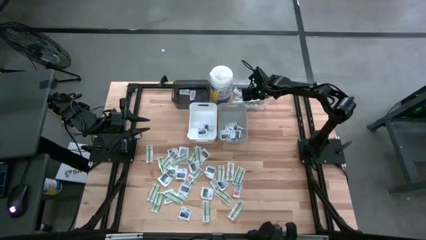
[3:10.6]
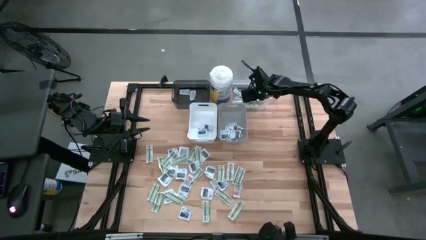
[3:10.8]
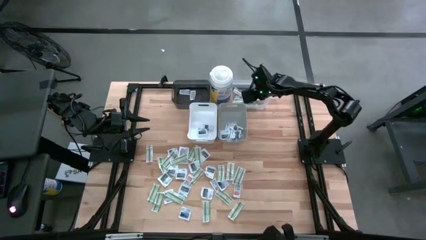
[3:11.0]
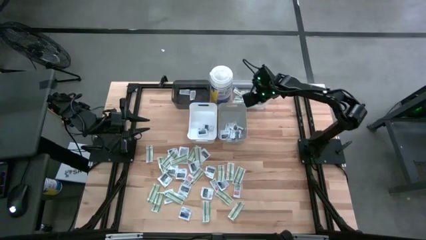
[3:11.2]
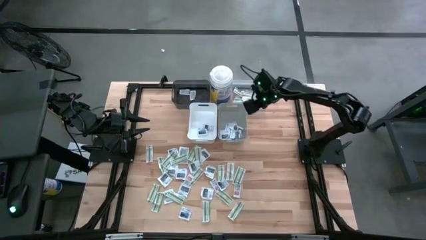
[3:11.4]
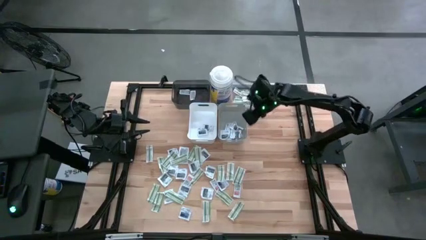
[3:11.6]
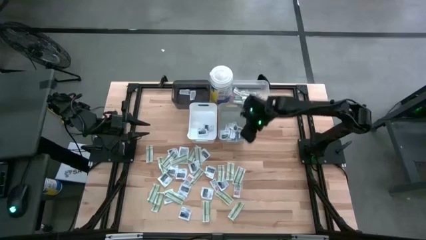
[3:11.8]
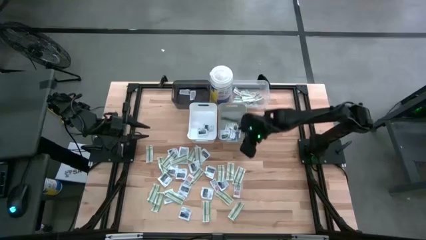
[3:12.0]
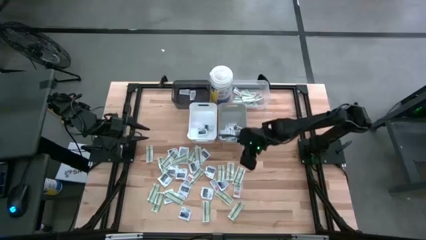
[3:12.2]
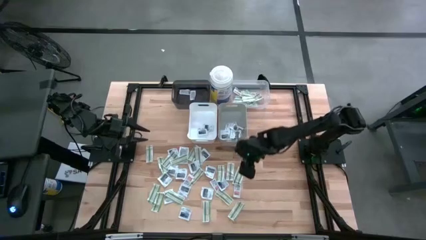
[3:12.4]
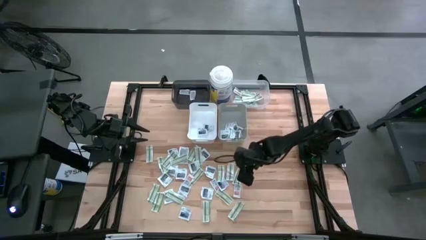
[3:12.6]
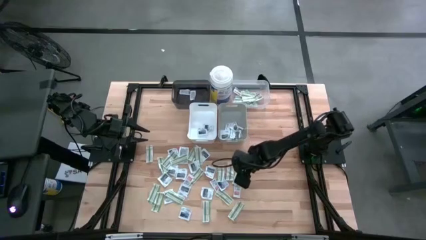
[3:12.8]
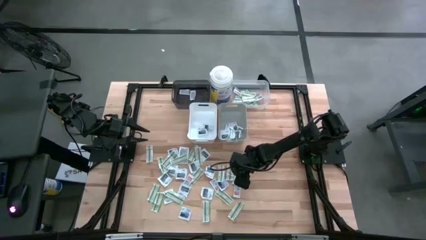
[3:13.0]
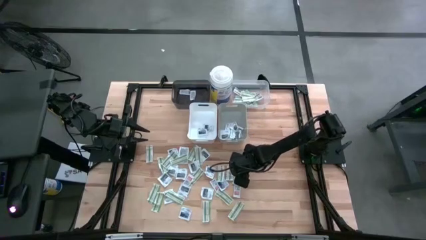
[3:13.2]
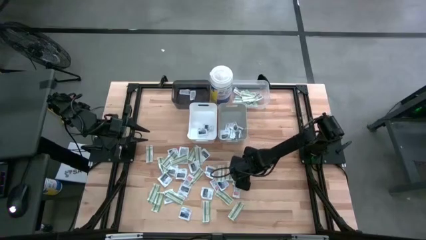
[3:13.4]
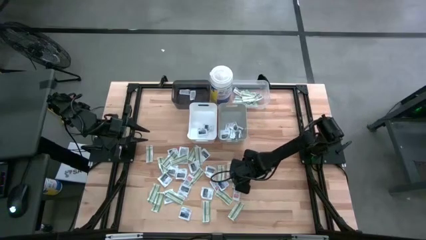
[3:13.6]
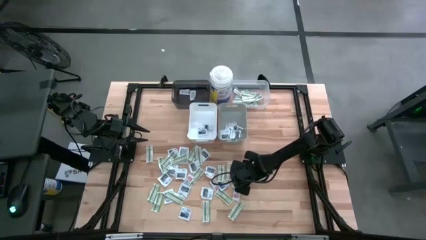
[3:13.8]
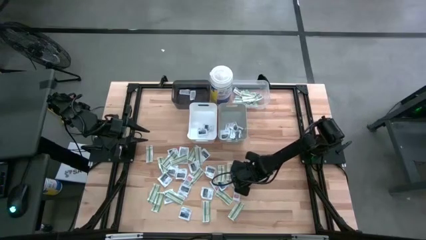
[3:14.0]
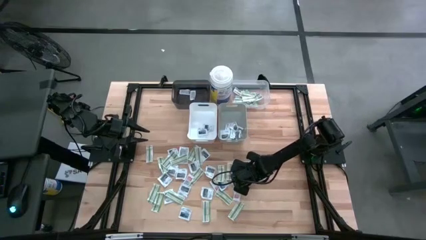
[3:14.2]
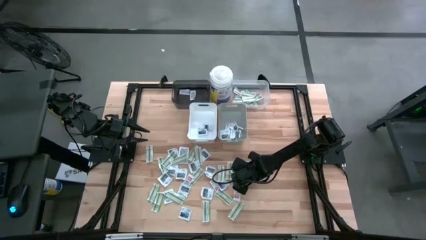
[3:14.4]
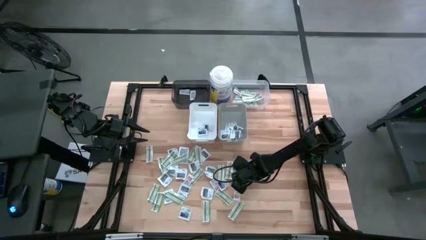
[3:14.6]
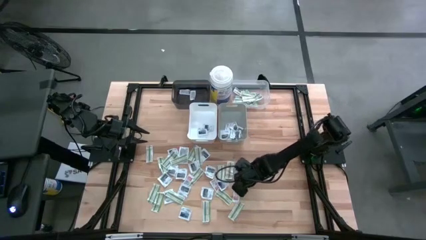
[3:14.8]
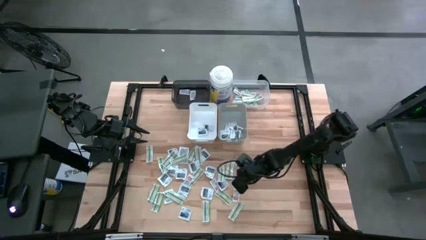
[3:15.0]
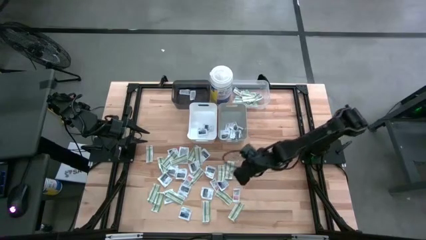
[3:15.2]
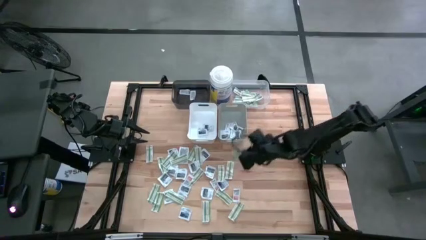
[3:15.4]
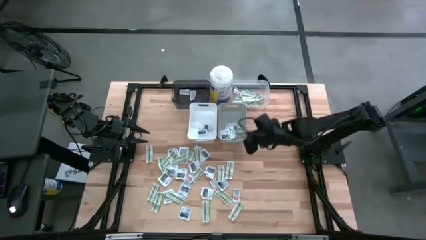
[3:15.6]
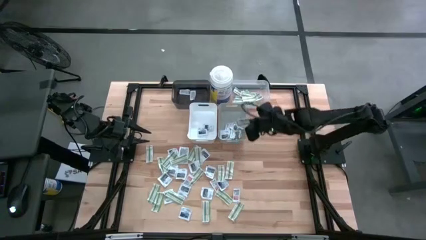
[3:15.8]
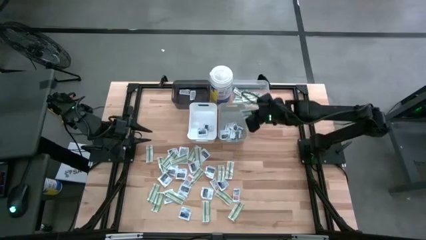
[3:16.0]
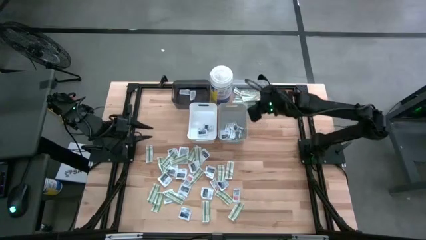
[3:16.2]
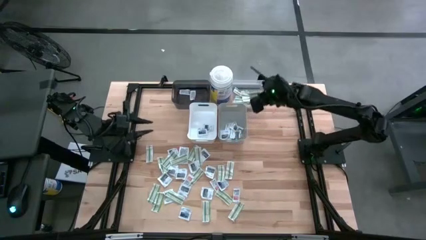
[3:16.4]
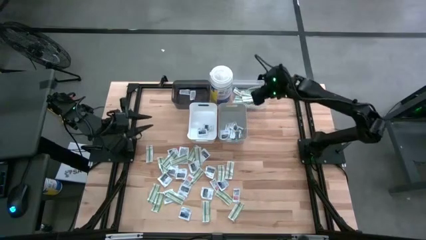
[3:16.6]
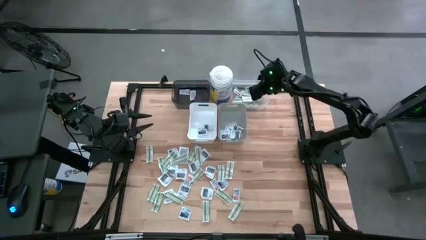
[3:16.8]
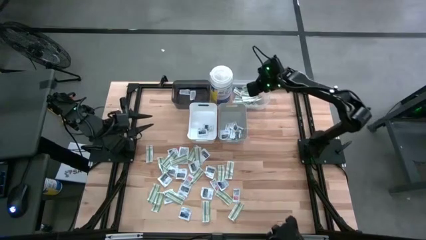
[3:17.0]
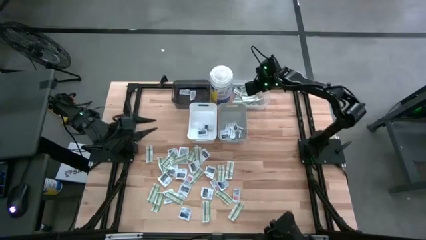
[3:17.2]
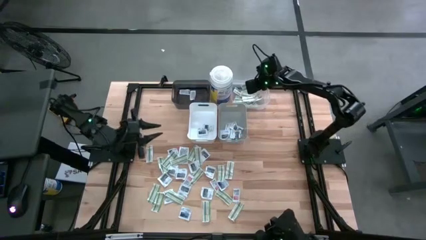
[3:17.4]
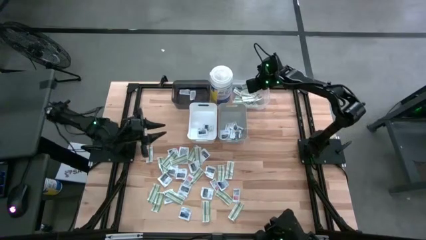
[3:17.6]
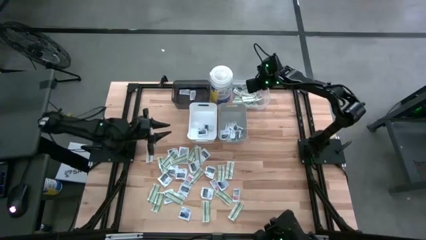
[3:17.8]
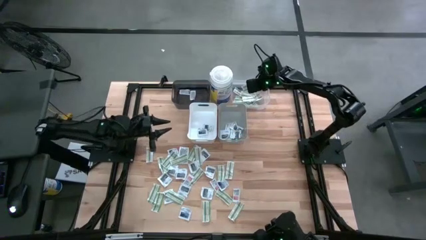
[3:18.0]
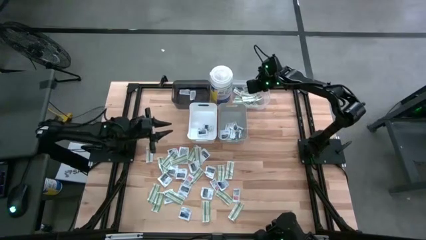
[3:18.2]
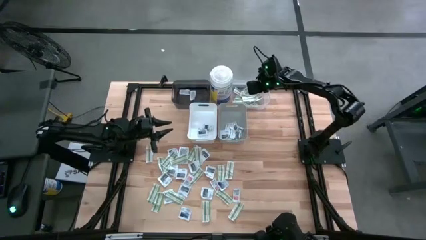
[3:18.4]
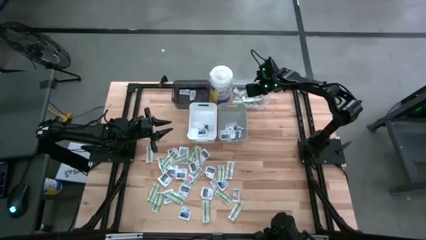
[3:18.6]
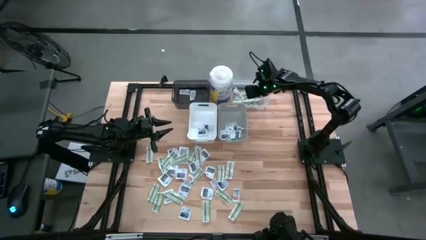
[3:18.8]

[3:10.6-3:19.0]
Task: Pick & Place First Aid Supplies
Put the band aid into the transparent bin

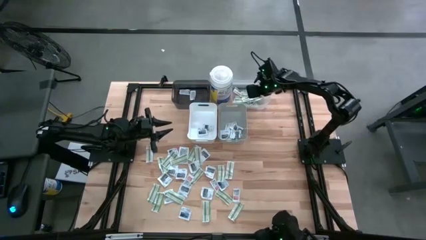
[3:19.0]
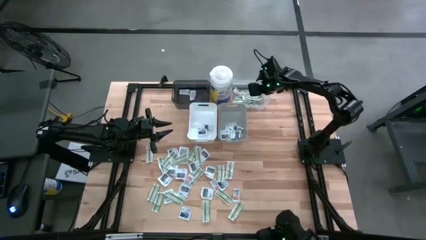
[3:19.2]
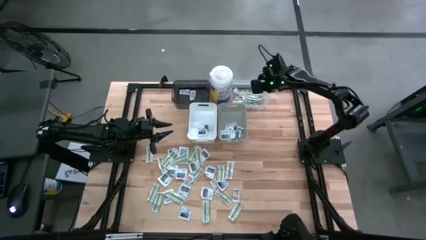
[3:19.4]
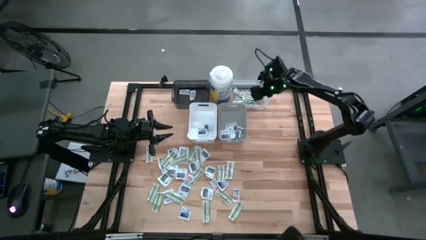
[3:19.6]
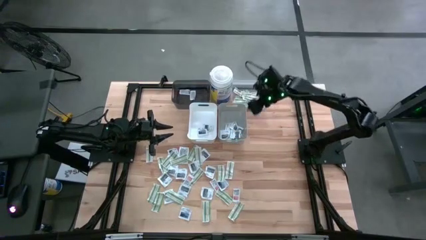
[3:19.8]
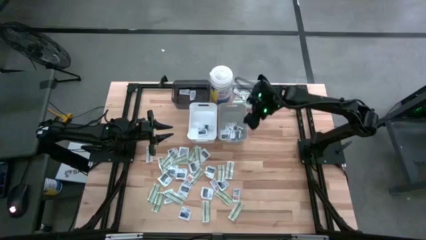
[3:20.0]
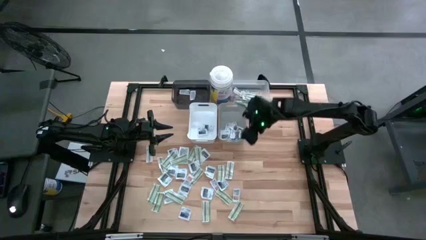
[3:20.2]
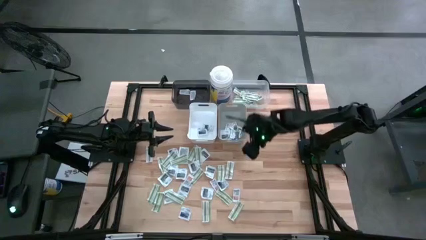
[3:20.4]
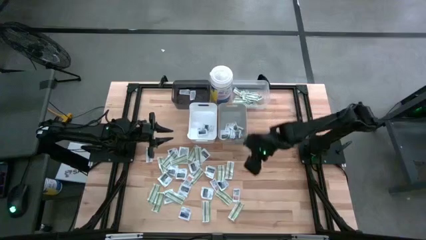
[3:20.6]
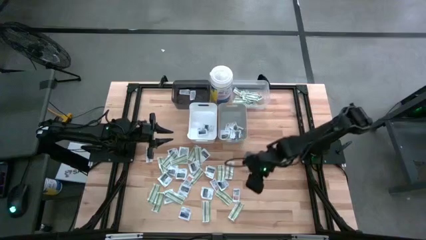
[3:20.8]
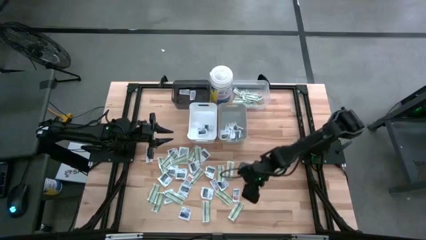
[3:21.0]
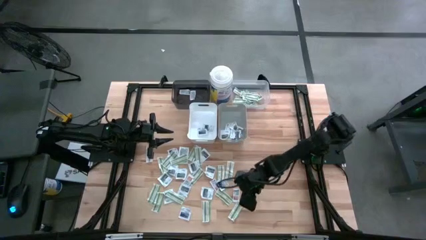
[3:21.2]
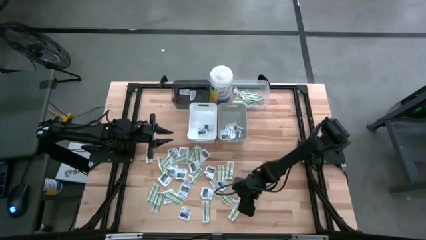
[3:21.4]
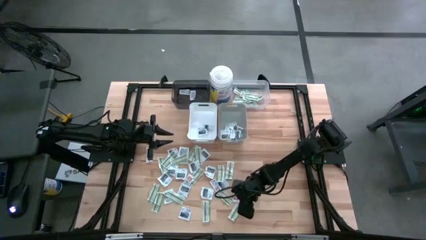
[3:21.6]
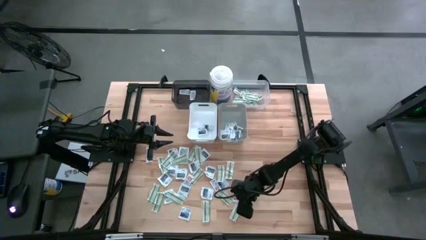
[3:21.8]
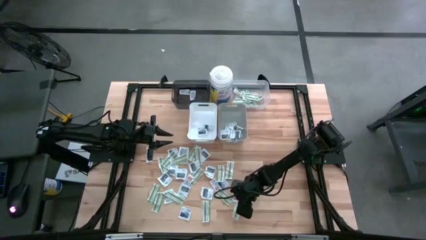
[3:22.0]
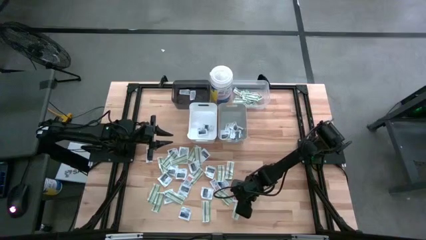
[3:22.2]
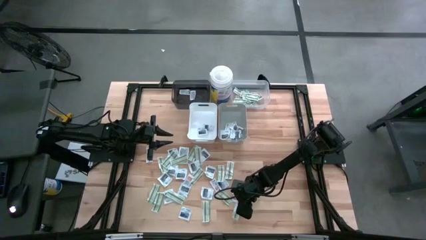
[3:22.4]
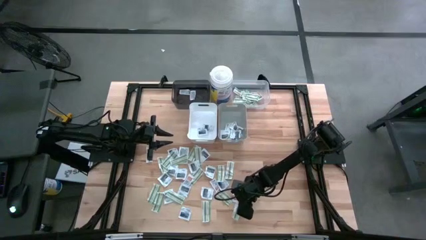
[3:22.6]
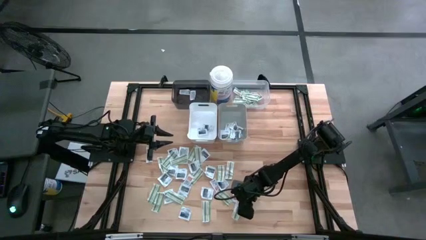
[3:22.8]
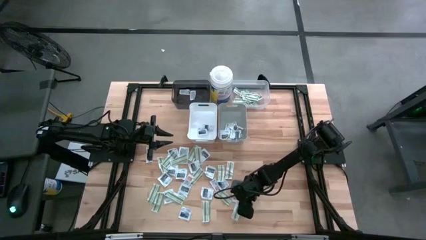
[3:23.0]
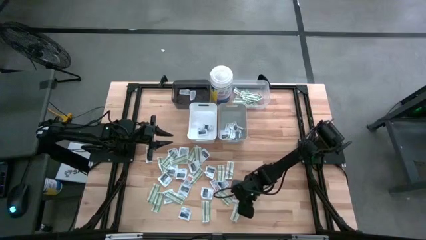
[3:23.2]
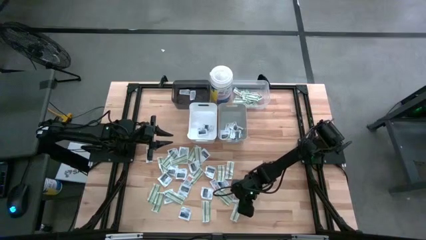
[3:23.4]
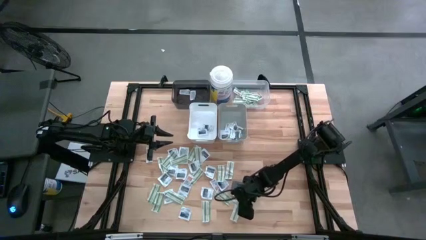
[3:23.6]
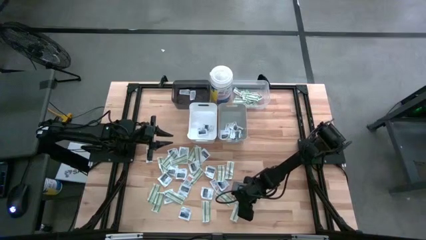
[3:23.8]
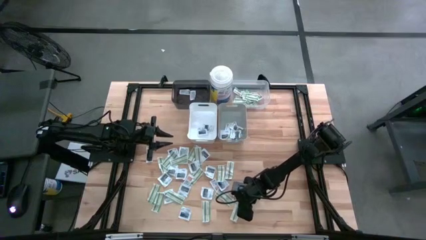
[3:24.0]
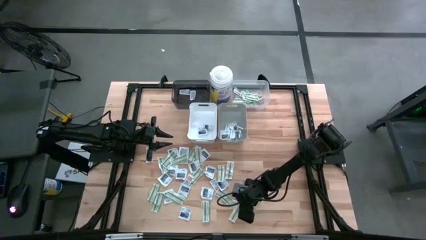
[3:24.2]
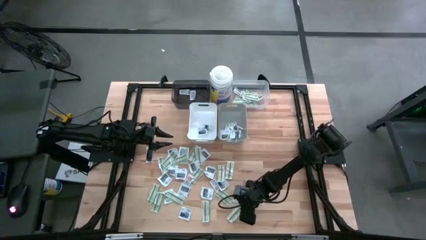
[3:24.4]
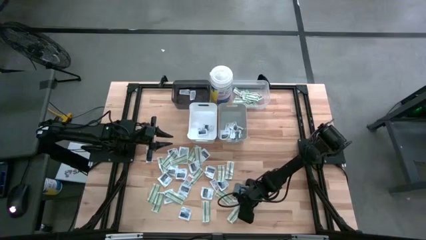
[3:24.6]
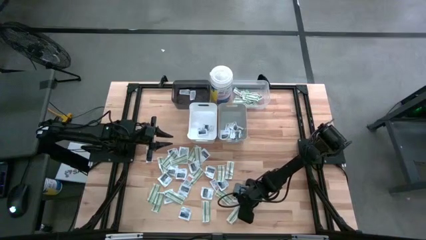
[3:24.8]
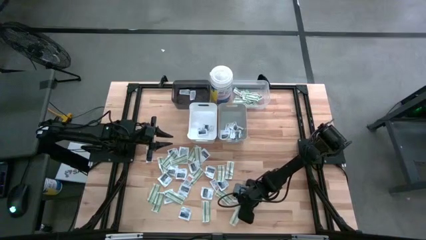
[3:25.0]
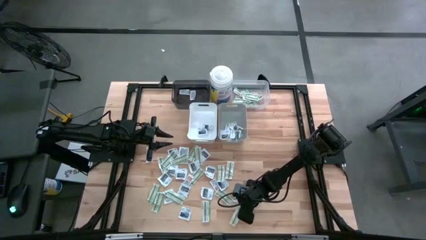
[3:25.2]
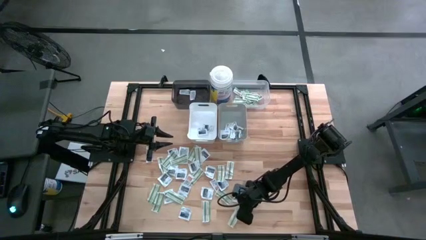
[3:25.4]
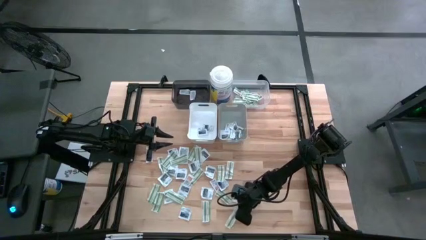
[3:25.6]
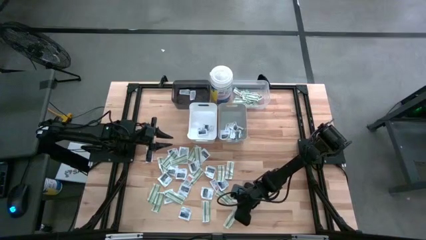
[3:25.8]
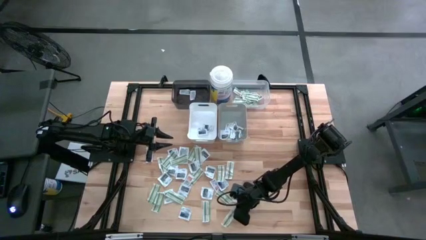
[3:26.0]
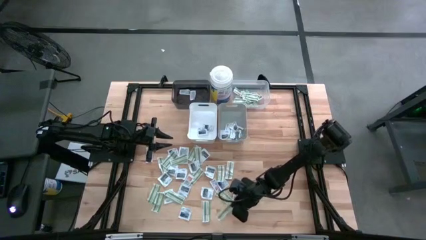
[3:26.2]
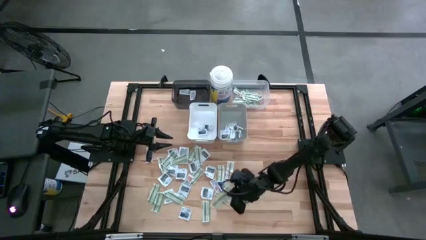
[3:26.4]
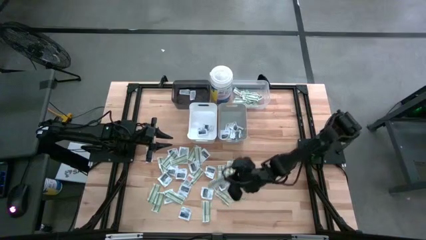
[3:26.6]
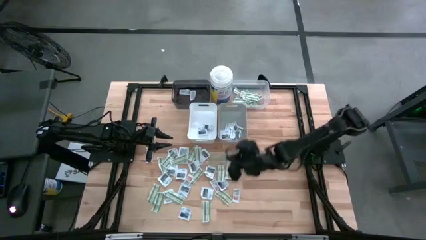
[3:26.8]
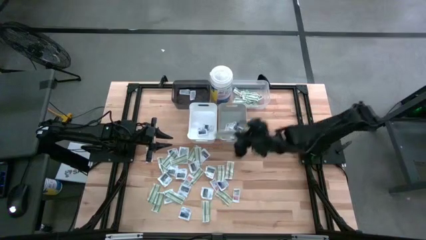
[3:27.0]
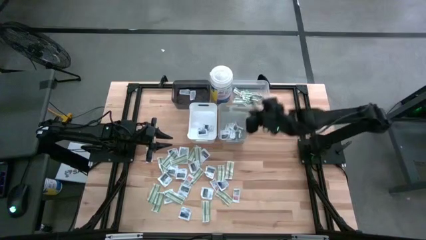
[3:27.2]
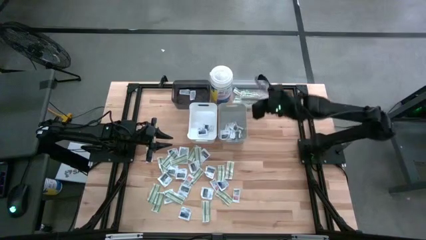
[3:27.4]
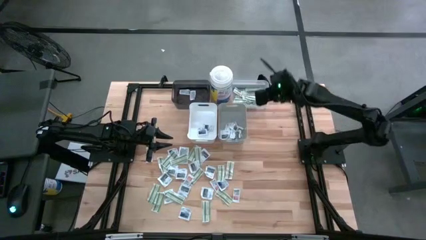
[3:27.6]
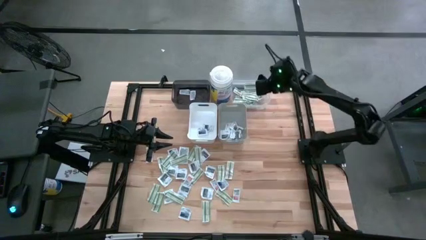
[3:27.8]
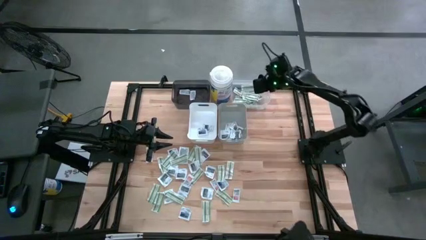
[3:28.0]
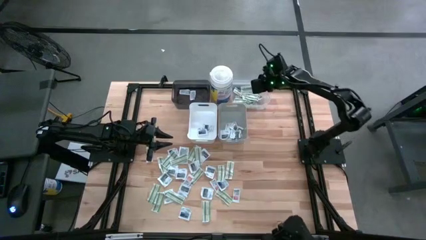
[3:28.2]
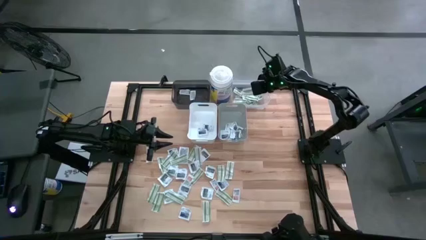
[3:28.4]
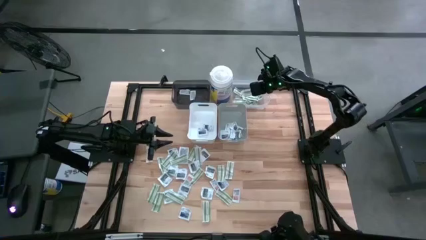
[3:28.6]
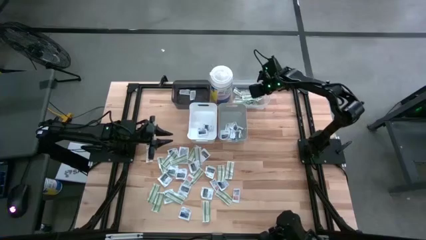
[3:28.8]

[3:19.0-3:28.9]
Put the band aid into the transparent bin
